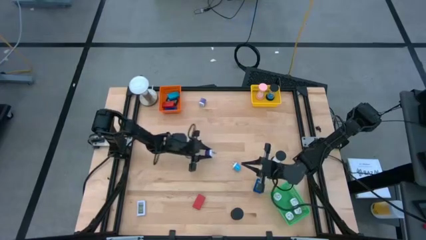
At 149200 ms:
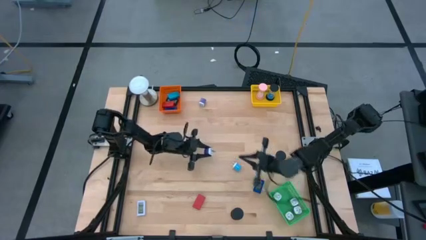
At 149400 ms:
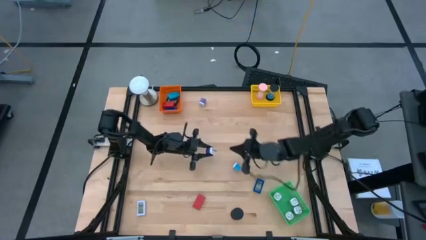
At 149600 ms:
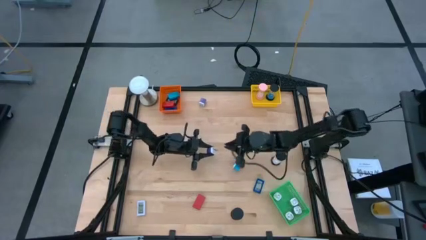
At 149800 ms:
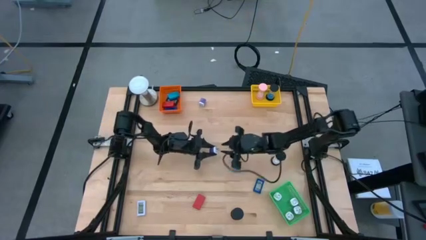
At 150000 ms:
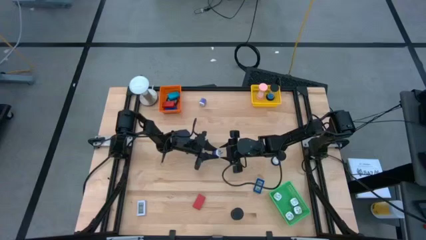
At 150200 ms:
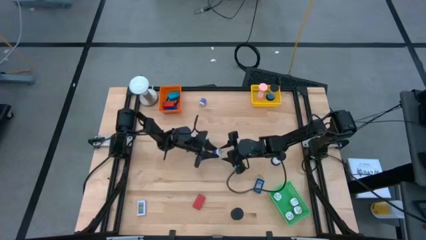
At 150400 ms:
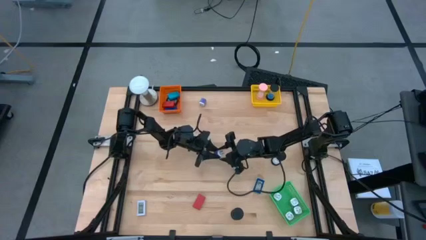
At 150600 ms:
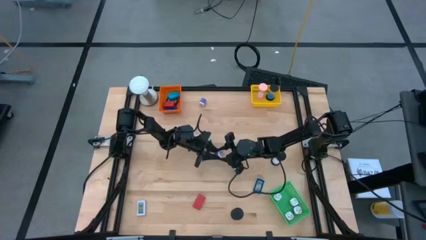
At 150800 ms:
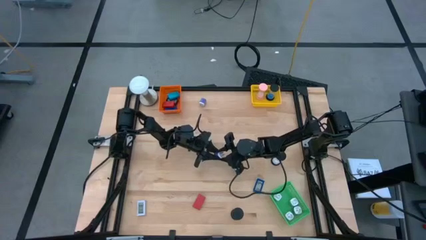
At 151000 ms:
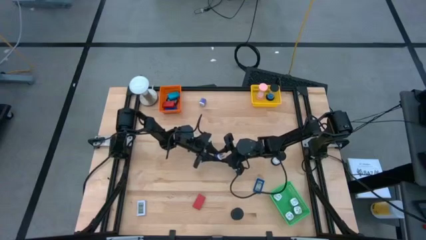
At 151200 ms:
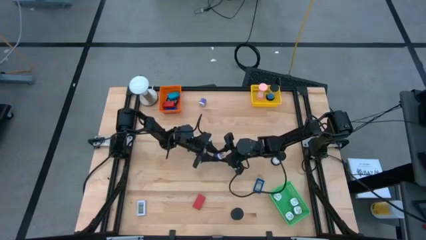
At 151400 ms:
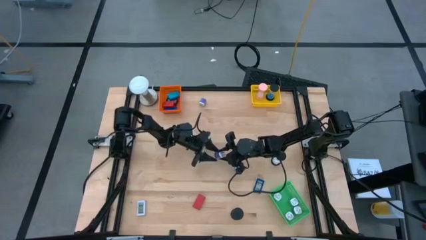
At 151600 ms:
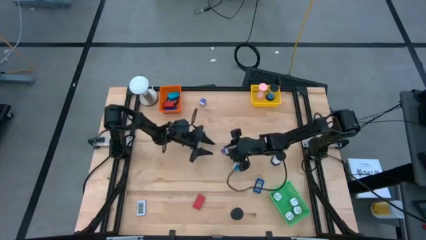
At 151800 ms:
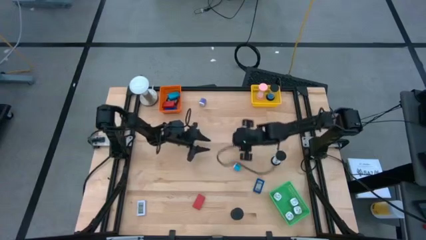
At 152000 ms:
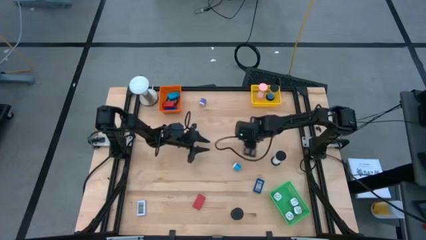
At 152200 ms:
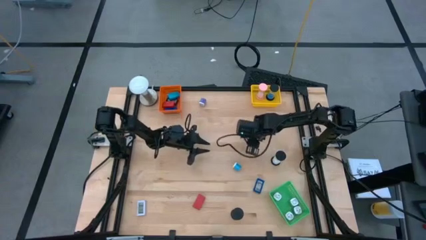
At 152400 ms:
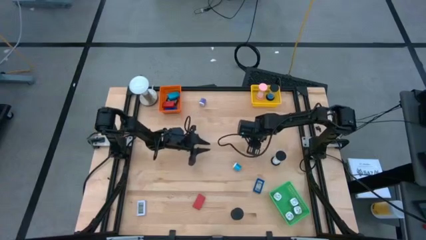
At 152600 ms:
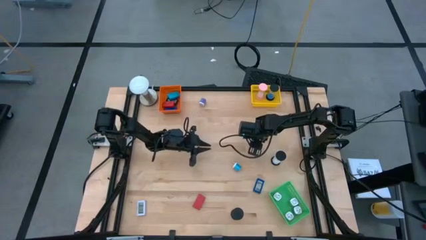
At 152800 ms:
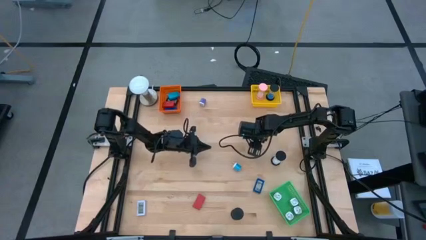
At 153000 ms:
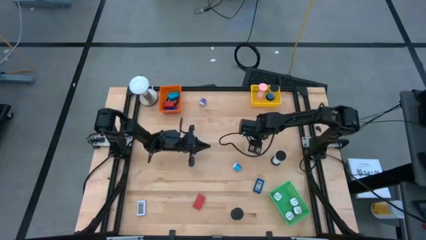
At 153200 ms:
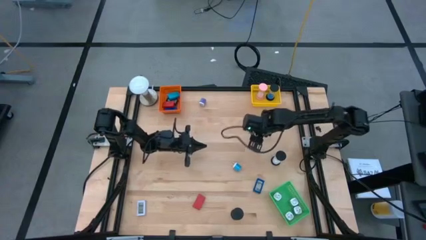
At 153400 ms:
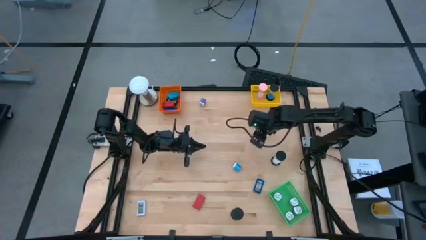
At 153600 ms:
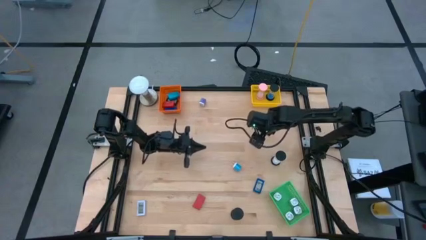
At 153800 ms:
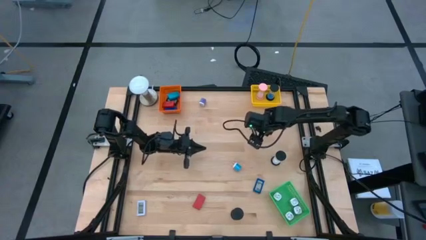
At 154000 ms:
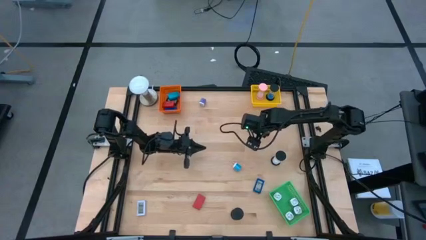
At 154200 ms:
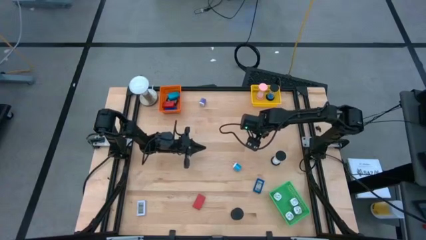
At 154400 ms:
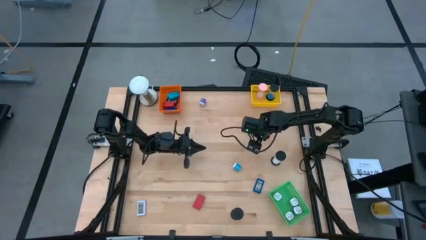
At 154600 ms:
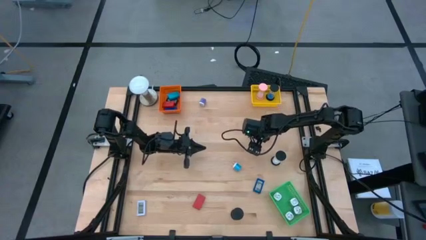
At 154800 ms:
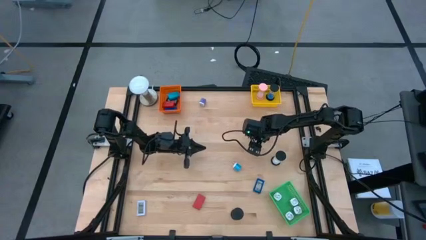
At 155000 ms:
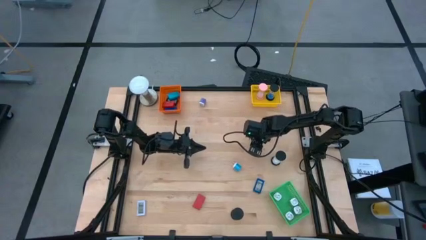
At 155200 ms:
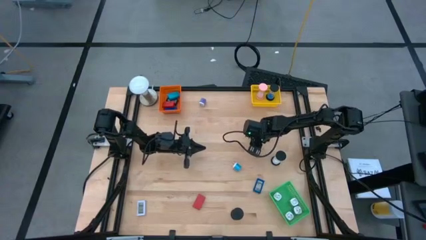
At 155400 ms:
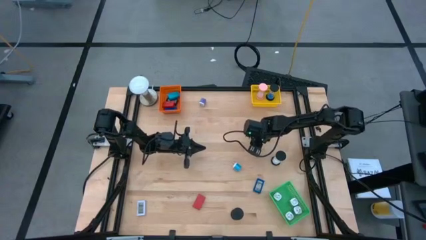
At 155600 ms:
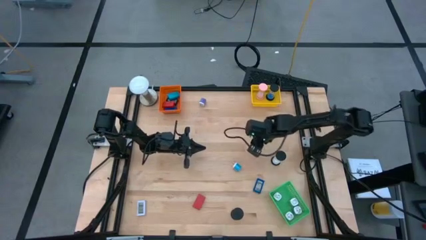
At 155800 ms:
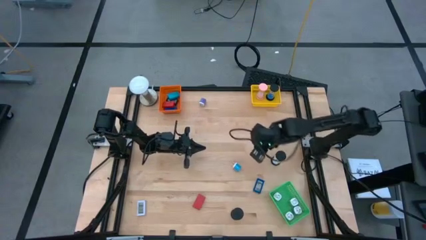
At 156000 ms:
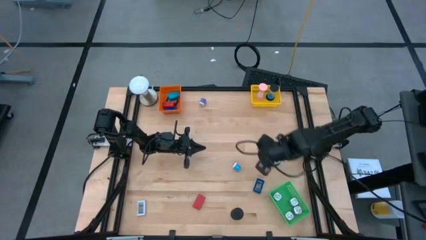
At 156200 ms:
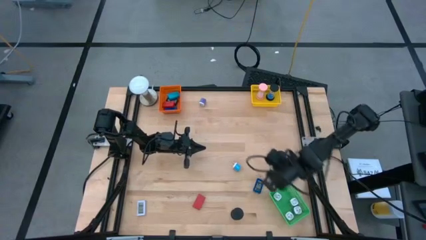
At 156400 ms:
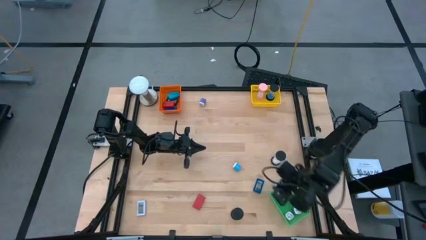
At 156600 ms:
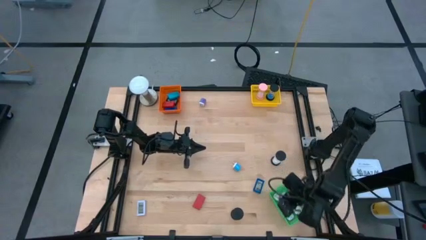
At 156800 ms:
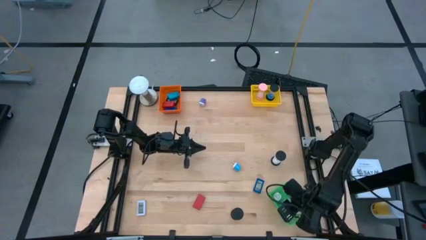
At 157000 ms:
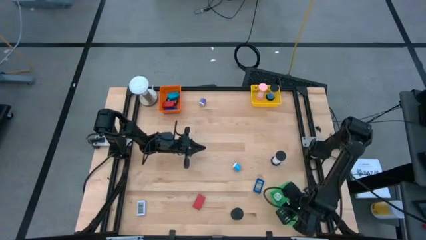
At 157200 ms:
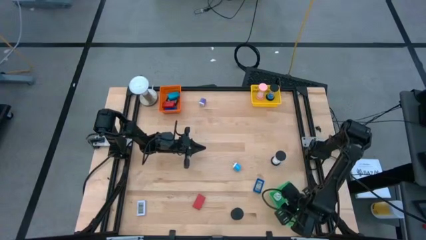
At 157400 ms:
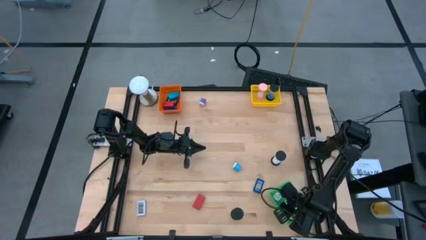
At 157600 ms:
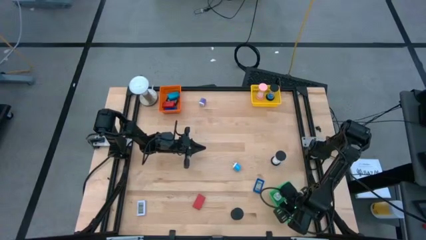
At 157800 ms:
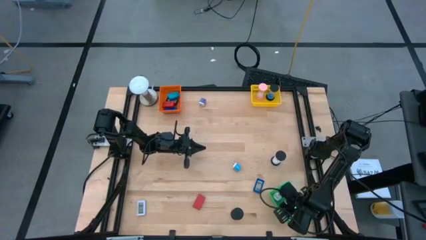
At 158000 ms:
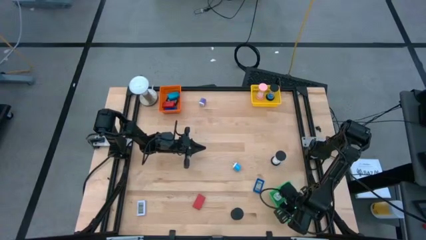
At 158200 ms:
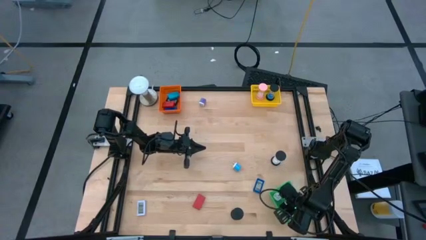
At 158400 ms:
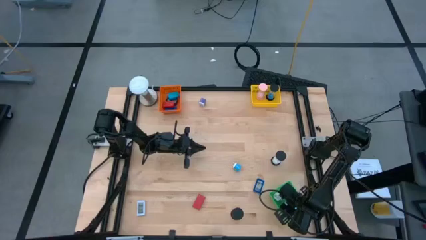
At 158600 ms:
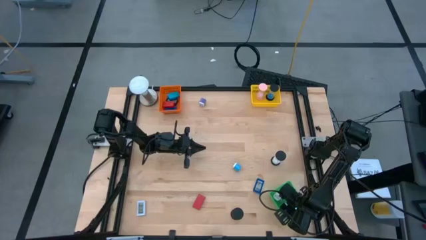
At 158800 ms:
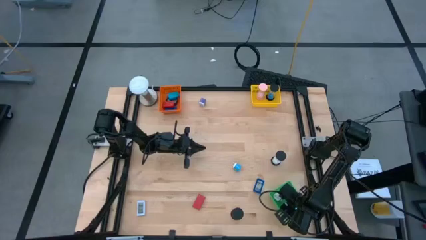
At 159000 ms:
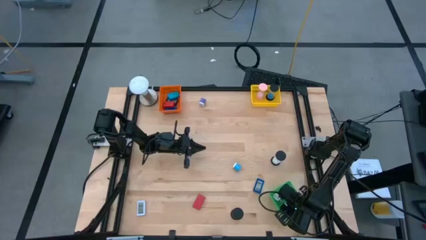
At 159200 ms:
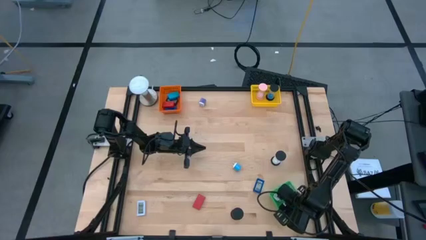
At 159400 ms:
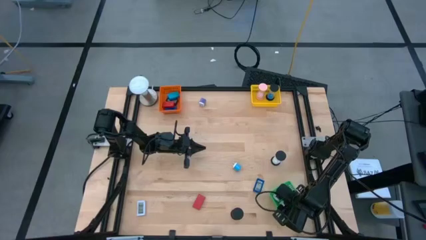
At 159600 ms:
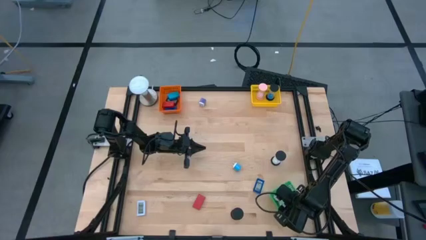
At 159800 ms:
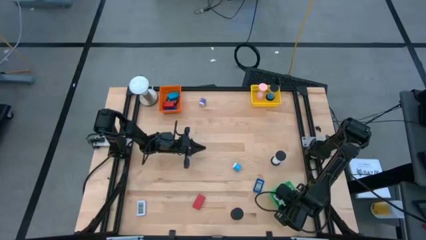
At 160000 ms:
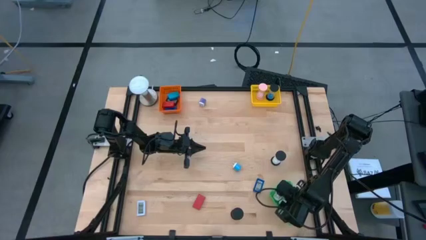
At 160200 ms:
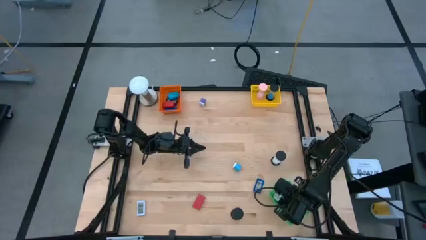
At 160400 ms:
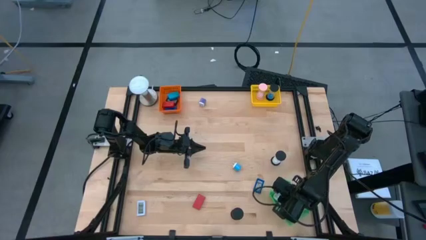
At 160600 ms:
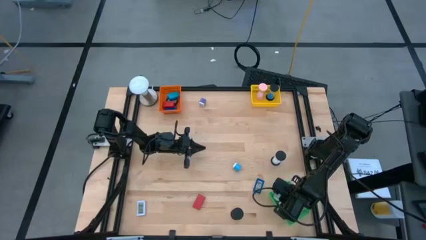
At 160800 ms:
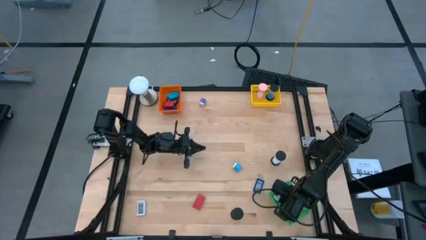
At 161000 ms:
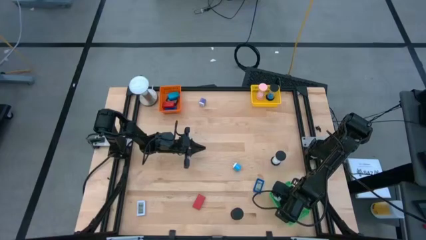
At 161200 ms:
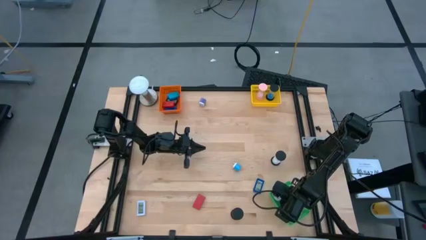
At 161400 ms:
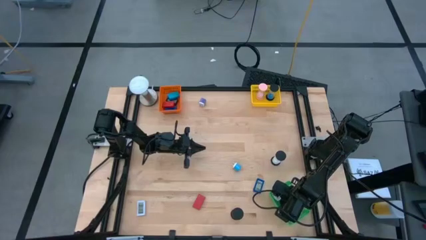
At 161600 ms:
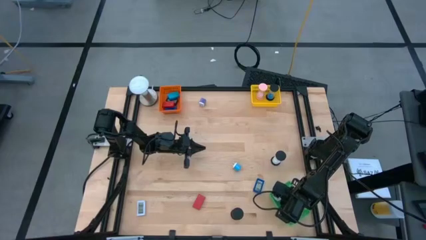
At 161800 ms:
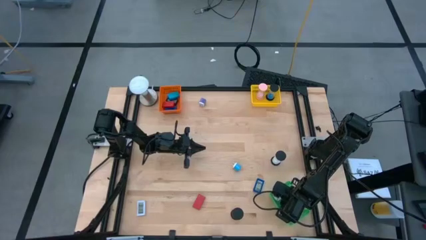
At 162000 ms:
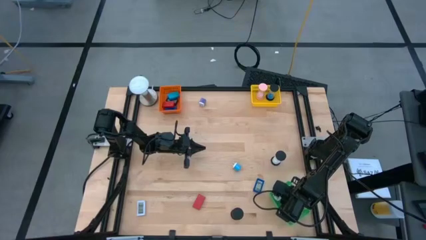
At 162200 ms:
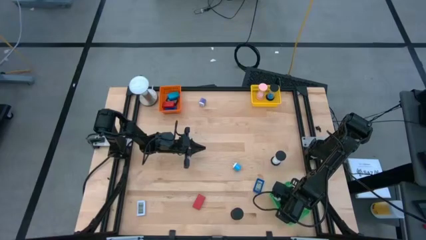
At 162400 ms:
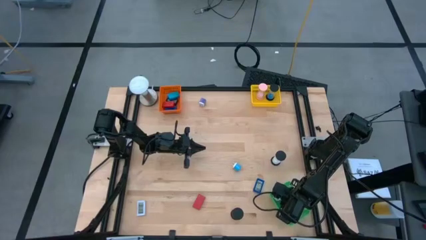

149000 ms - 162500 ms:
Task: Pick & Place Office items
Put the bottom violet charger adapter into the green bin

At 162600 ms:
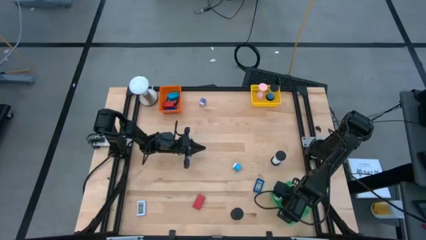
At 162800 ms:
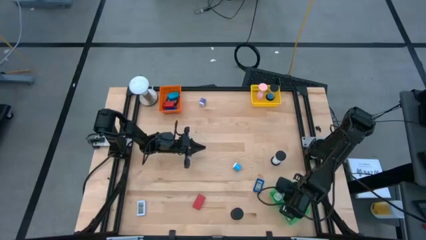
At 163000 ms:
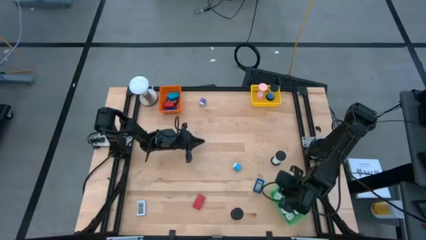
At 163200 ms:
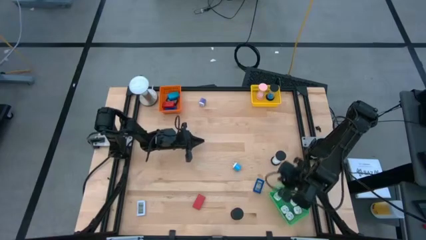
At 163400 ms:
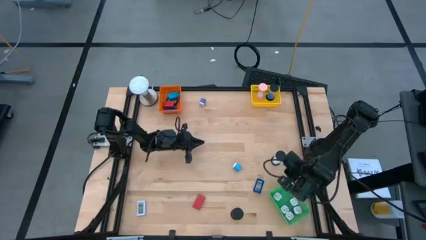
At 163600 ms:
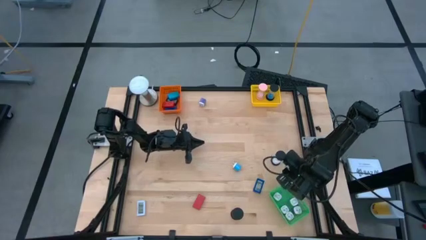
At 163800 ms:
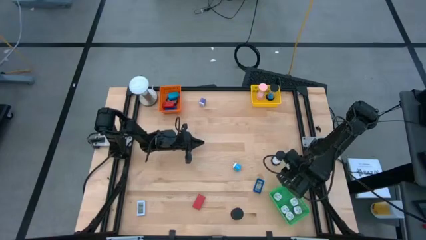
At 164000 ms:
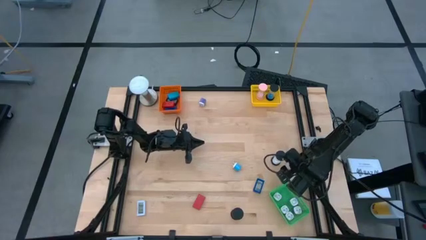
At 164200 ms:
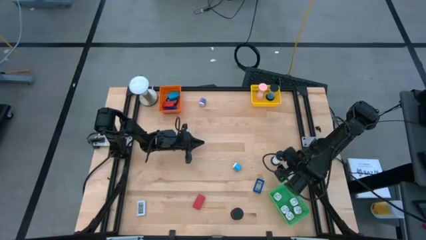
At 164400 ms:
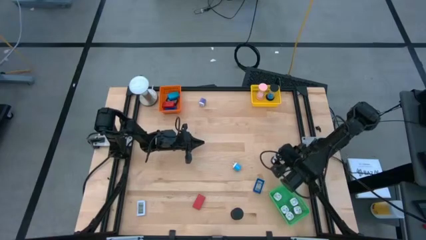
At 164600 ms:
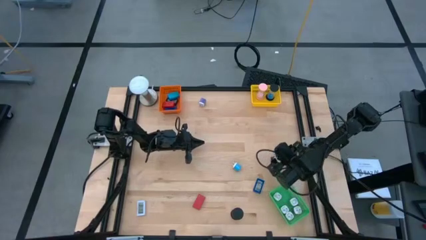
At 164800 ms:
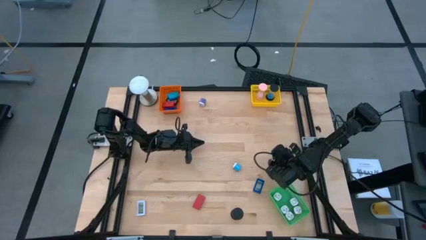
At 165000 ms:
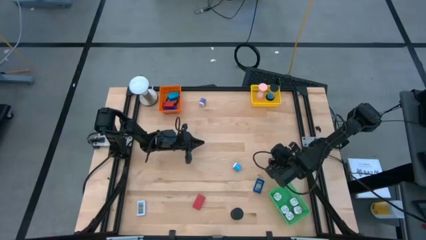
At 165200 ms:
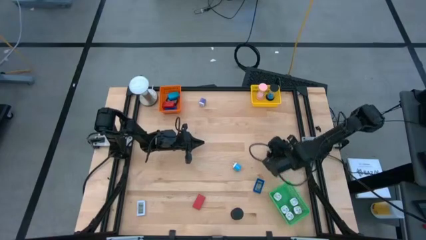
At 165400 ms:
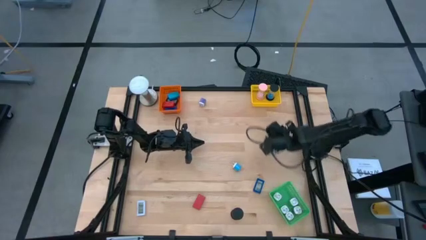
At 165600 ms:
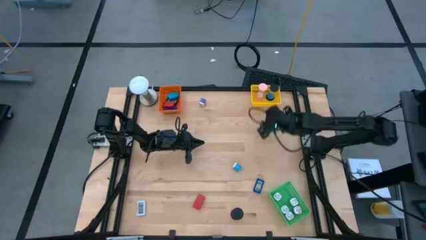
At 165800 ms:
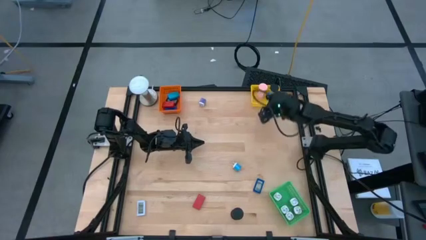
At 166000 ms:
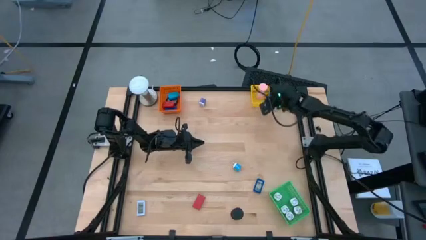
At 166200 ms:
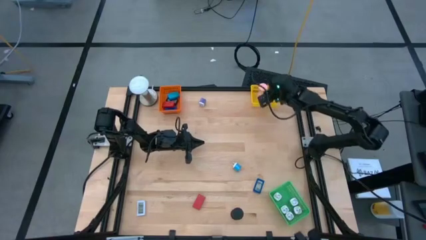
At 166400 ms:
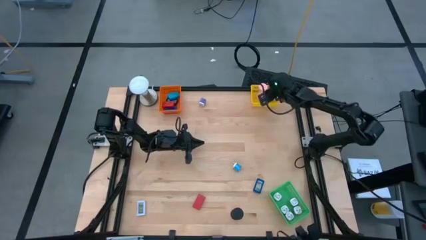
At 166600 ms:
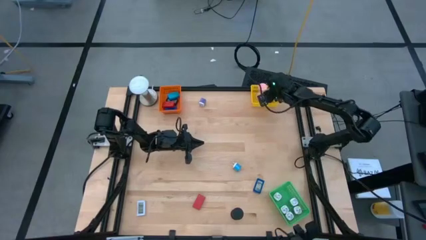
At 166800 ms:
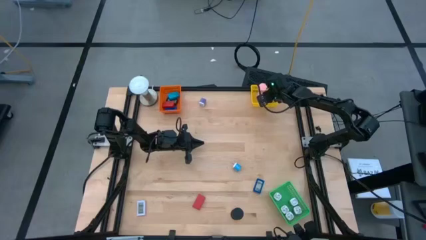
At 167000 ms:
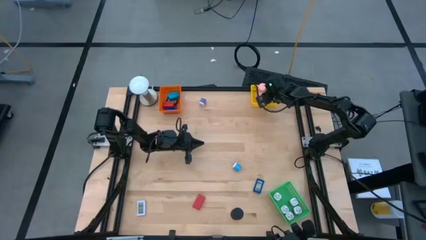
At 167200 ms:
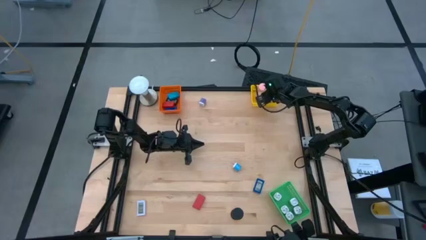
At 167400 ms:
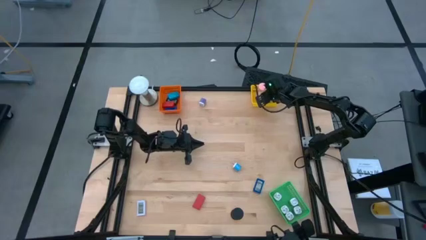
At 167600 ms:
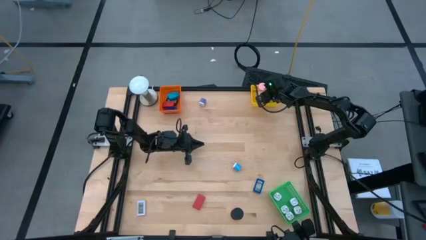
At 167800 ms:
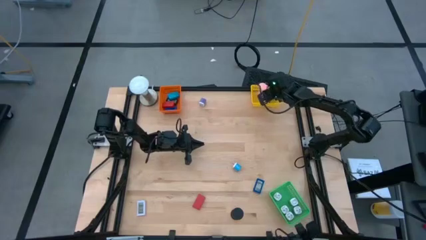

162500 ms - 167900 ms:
Put the white hourglass into the yellow bin
